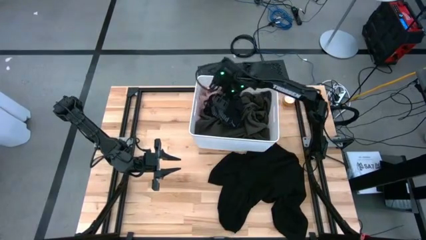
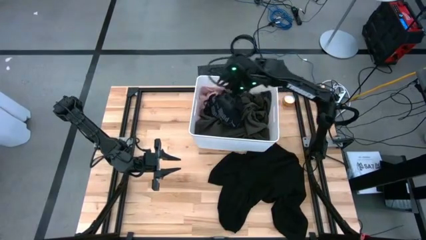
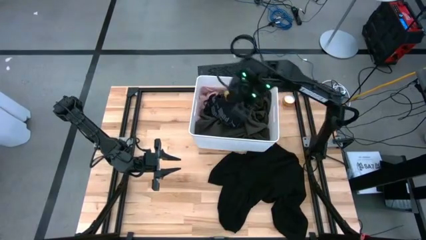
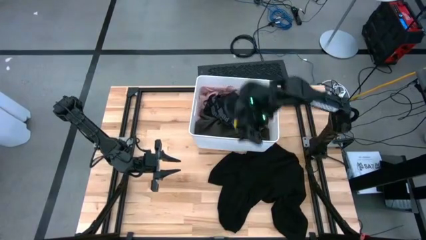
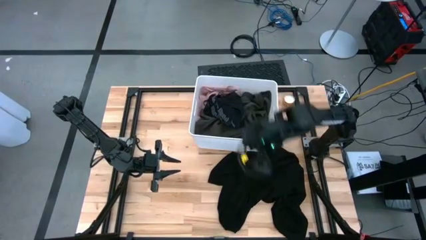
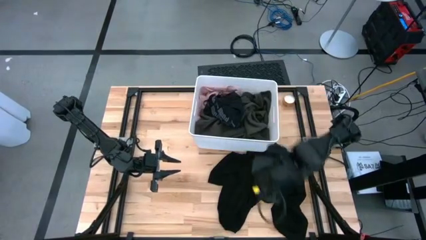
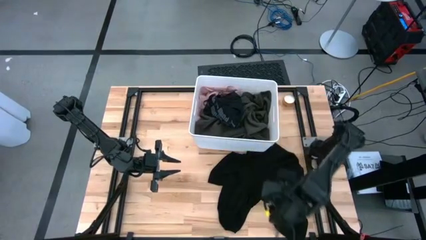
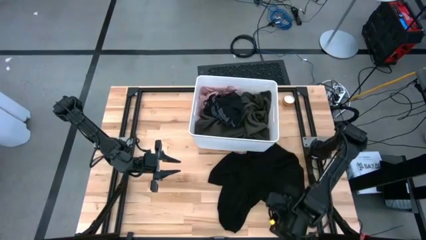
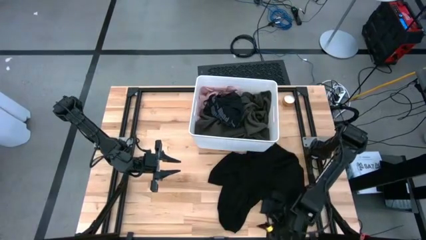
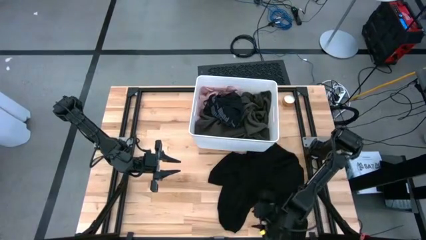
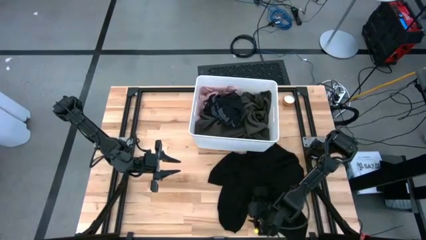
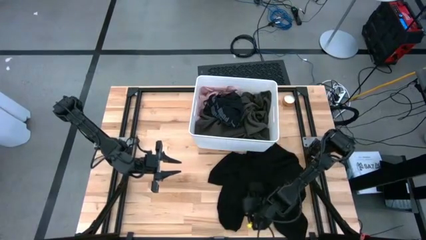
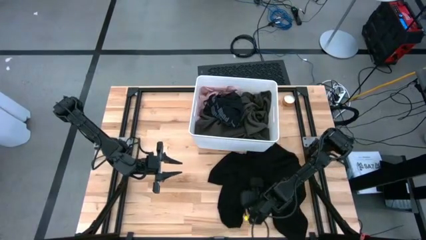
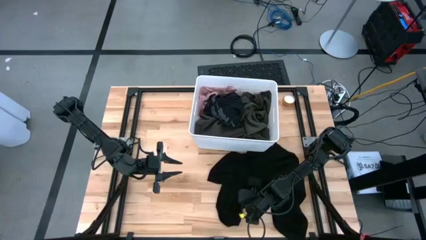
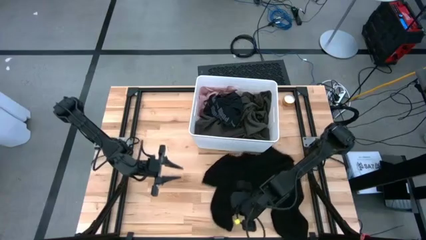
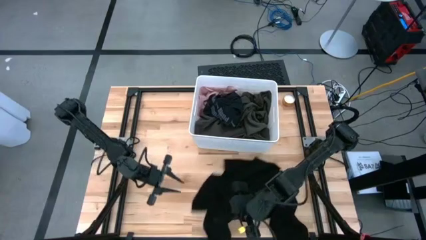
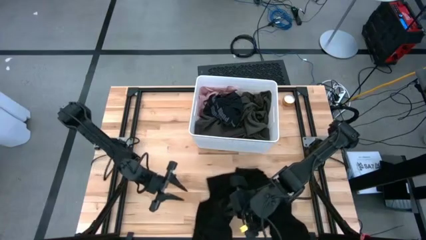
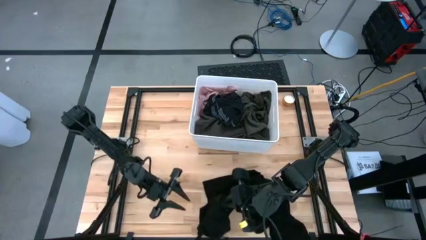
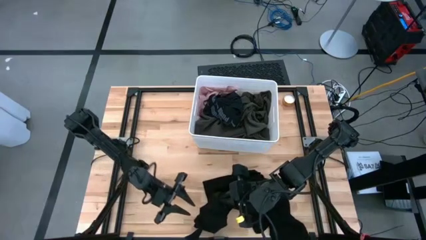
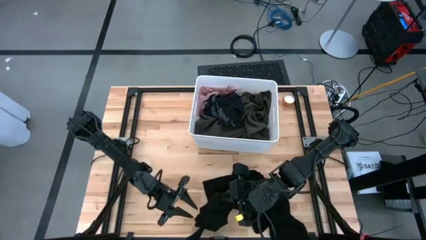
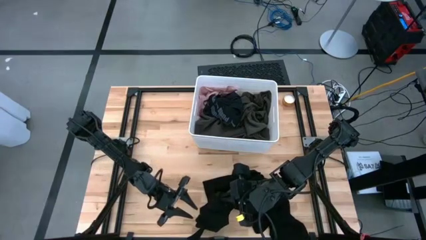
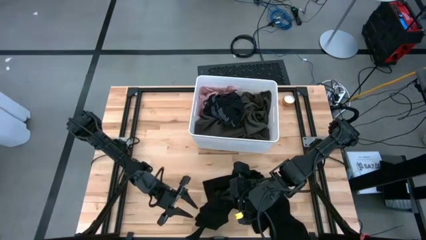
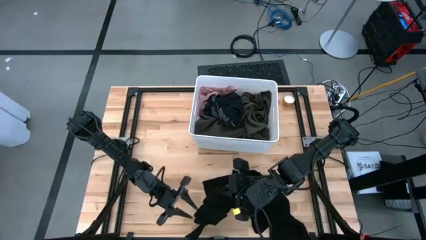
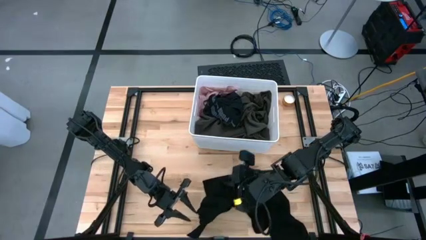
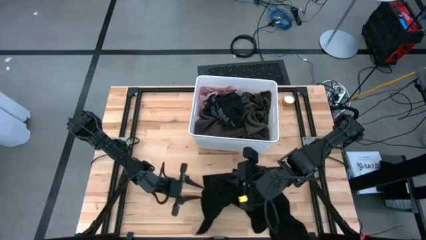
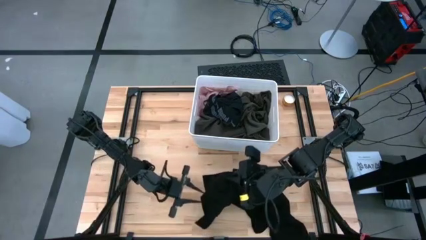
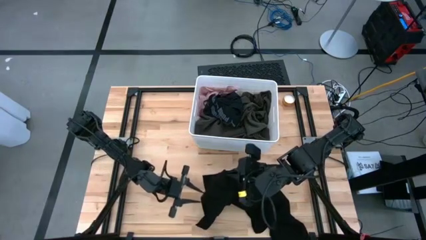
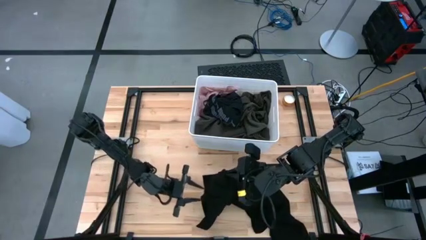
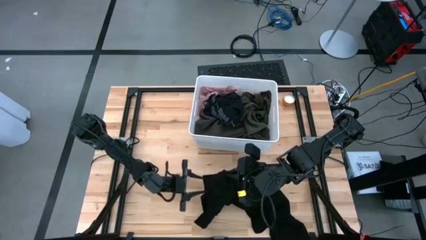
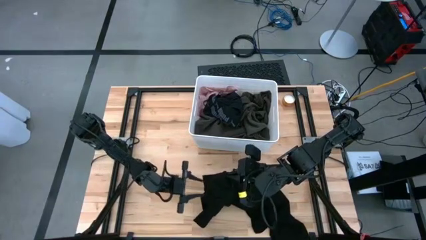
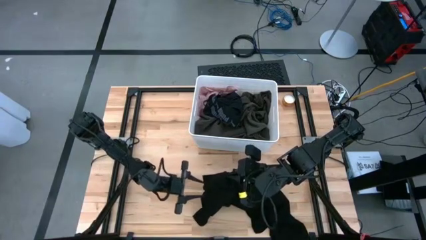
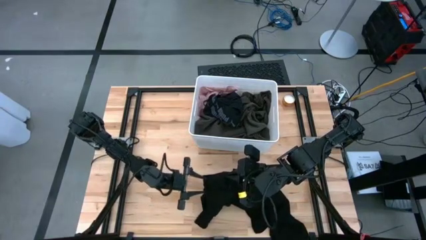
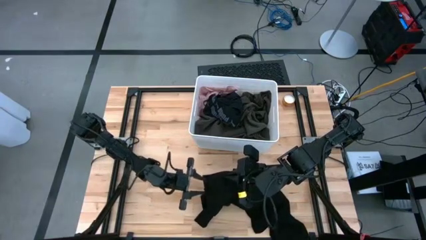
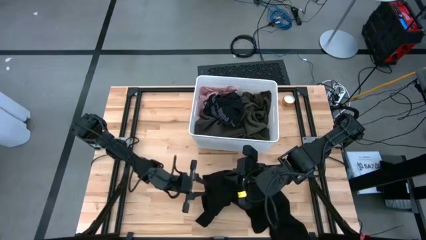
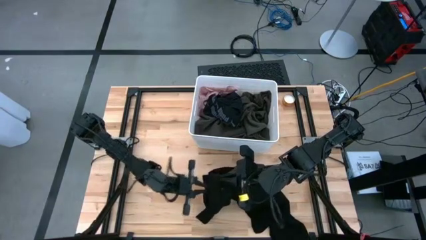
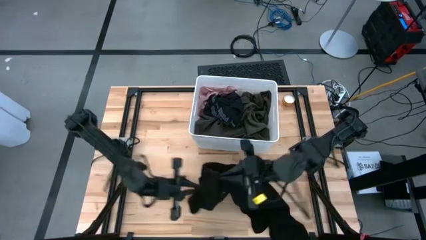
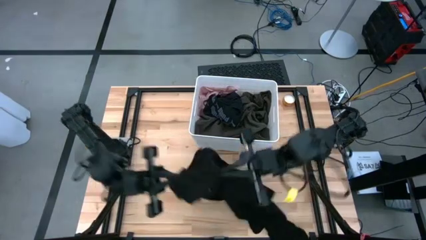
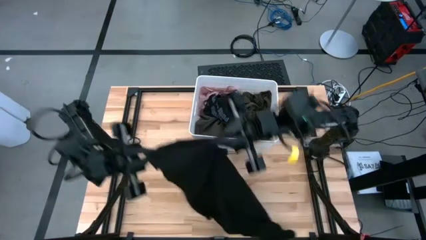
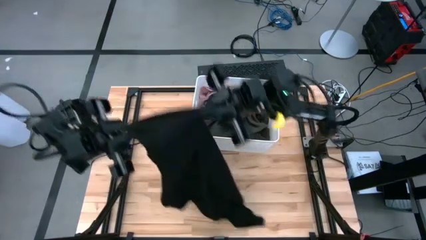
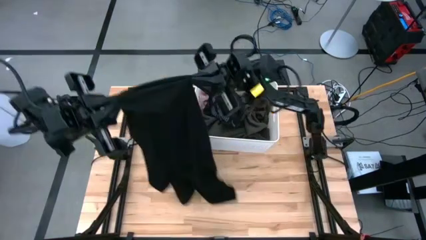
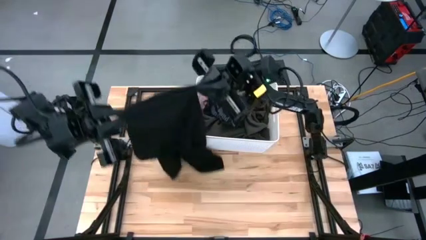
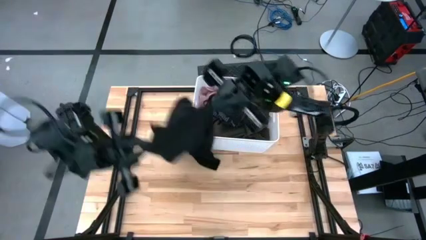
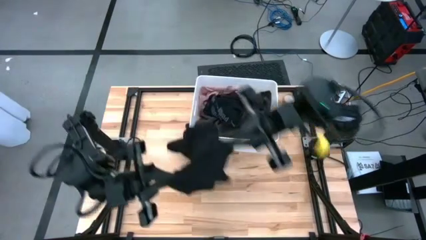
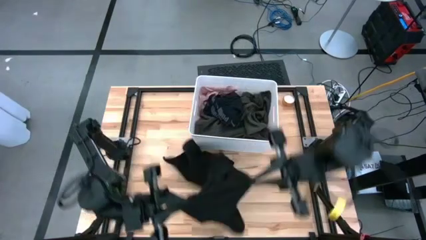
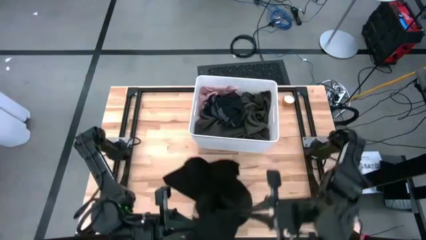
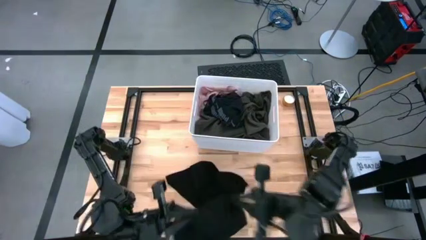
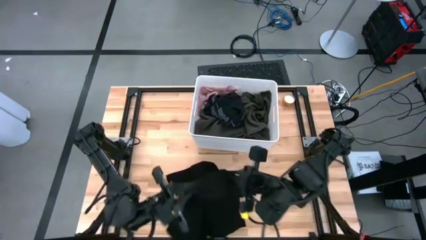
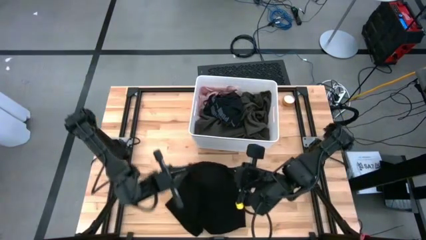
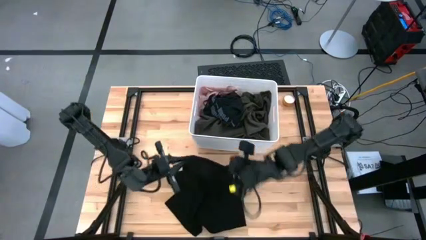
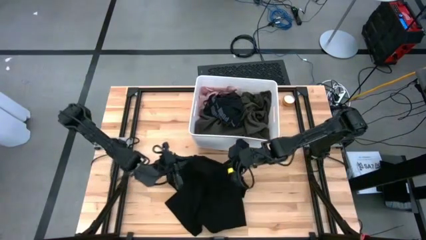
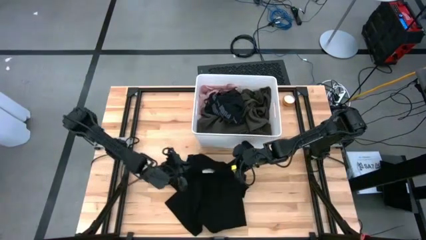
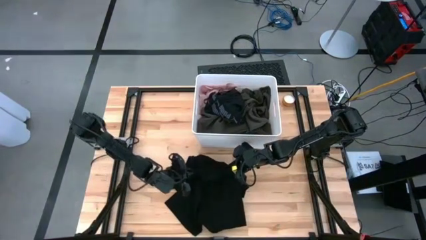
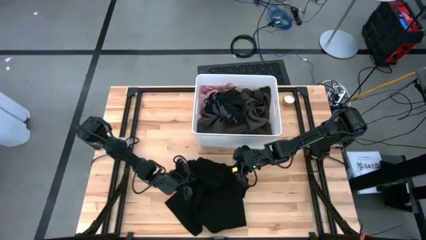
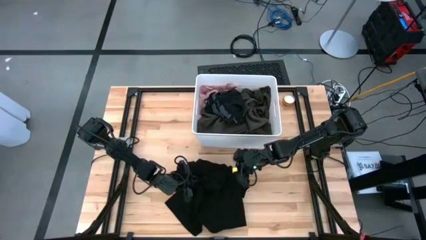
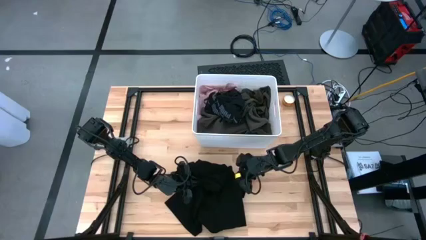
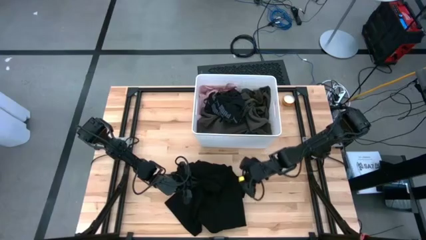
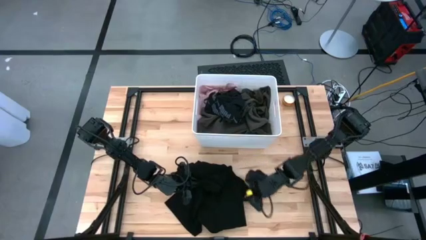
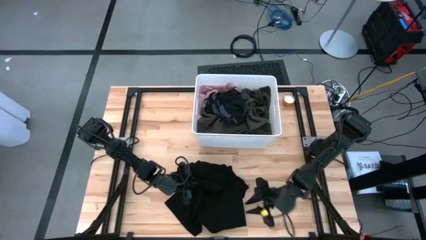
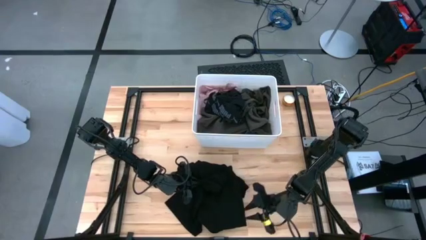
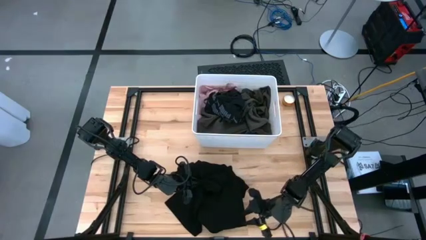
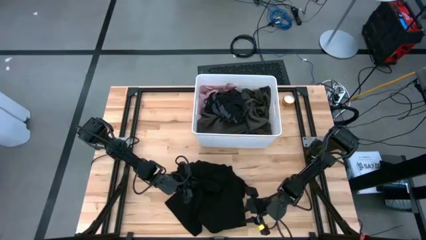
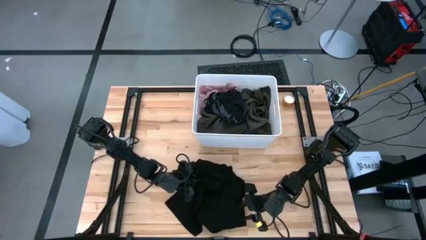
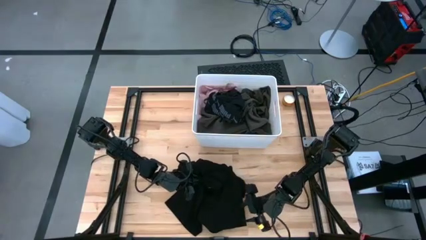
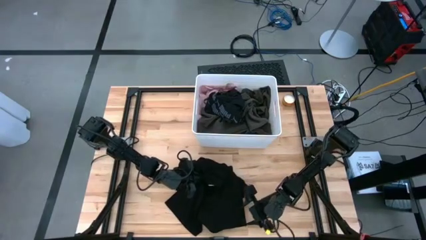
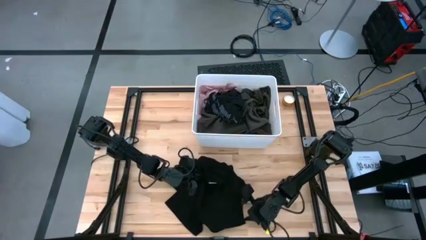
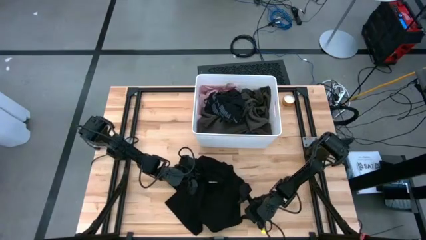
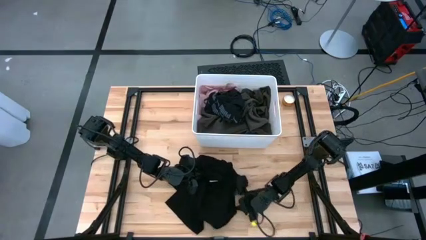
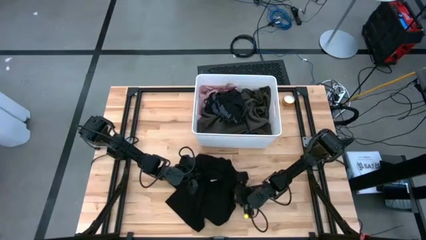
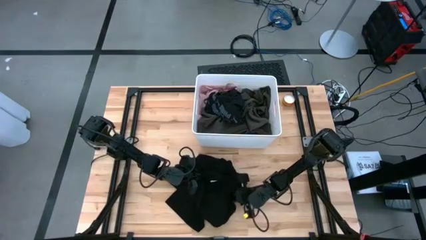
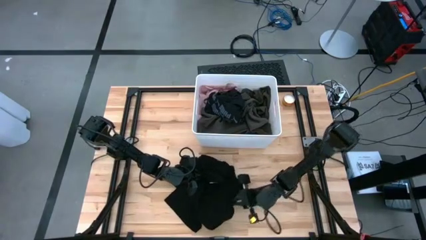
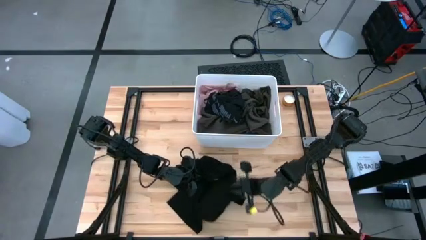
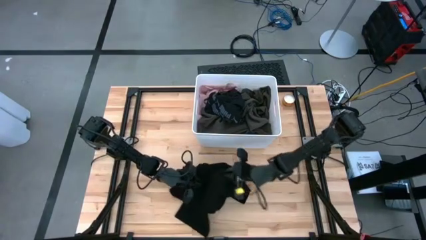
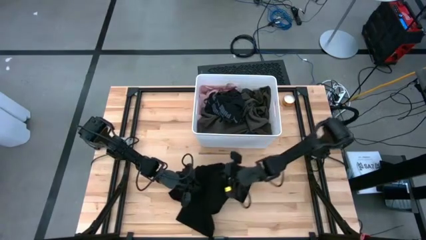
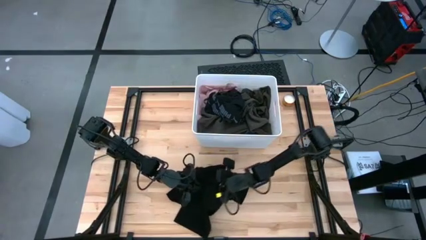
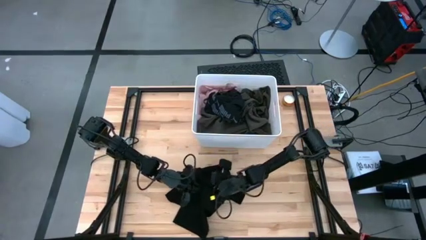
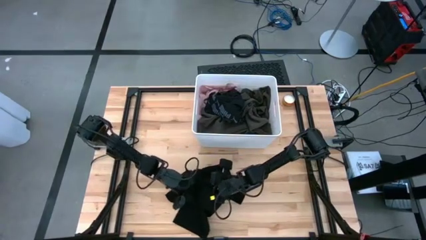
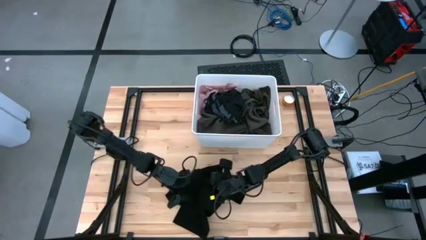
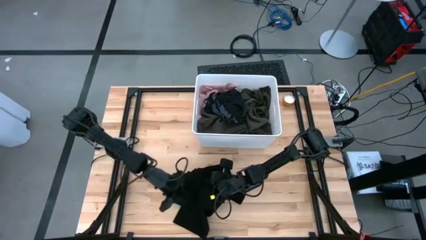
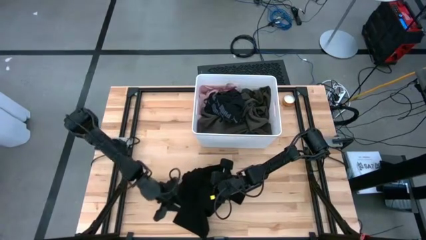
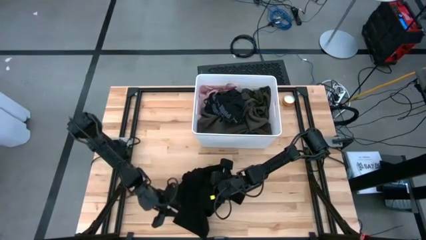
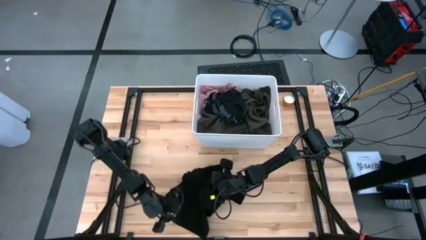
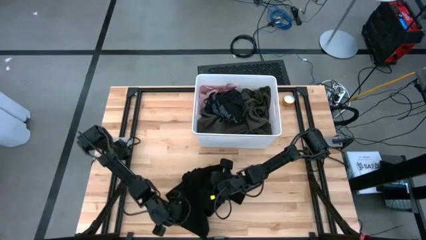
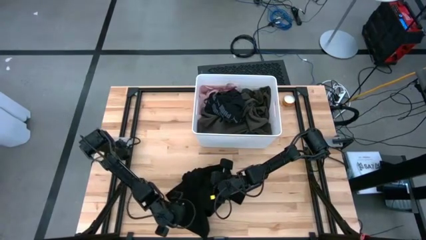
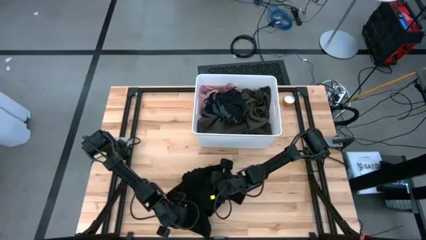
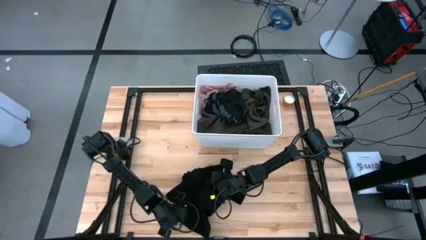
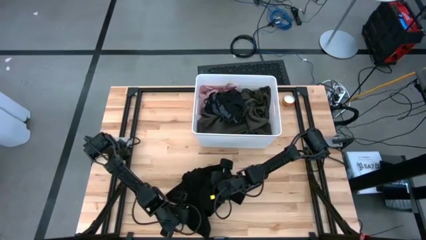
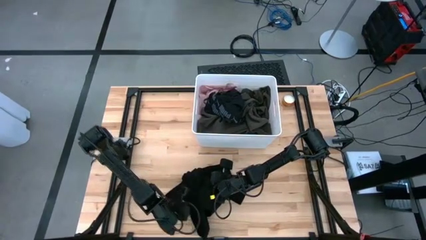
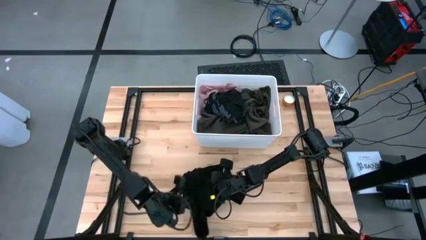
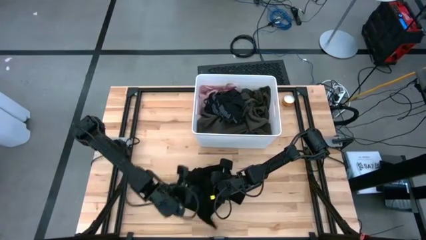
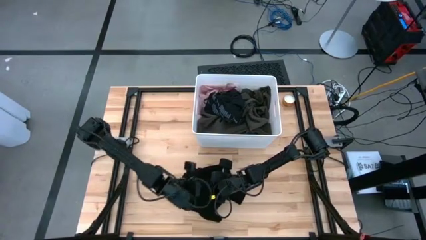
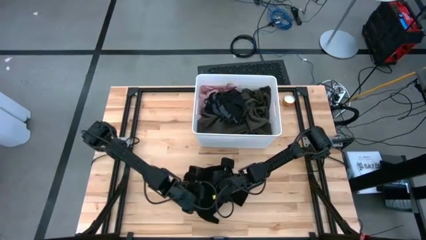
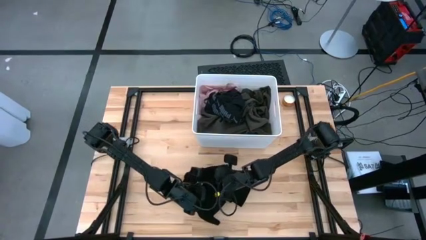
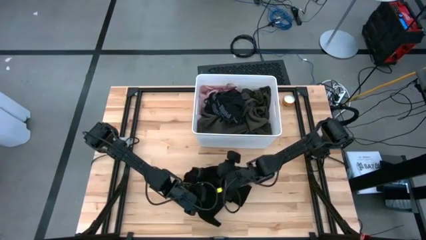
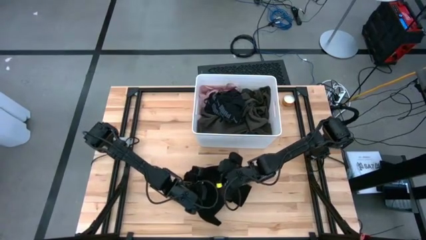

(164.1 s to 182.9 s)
Task: Sort clothes
Fold the black jacket
